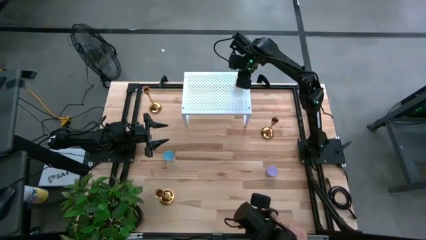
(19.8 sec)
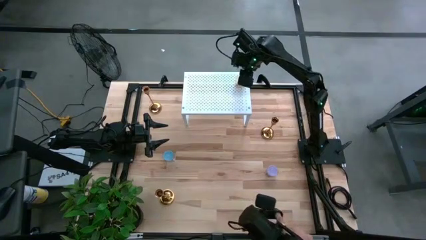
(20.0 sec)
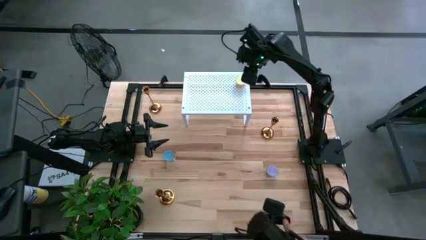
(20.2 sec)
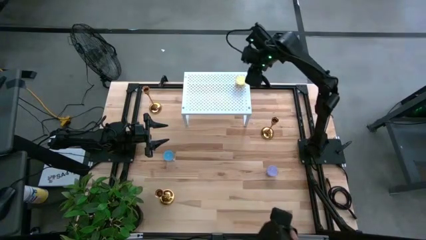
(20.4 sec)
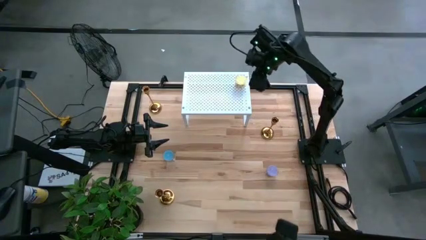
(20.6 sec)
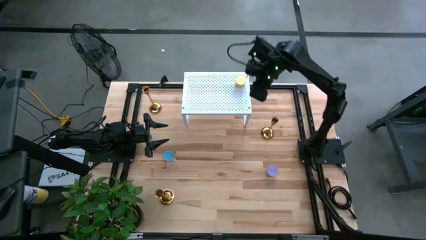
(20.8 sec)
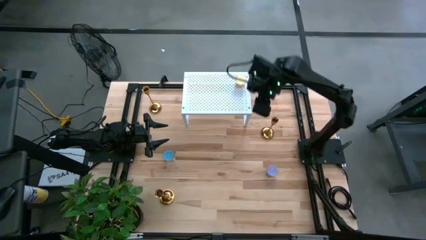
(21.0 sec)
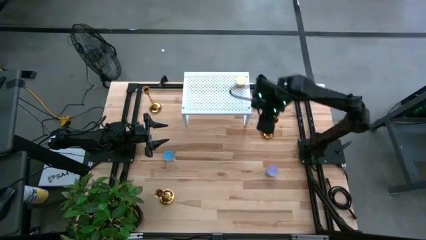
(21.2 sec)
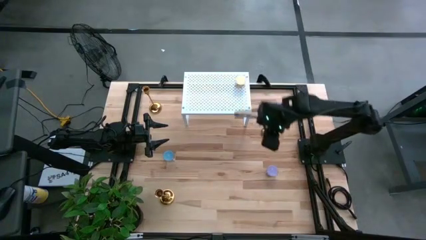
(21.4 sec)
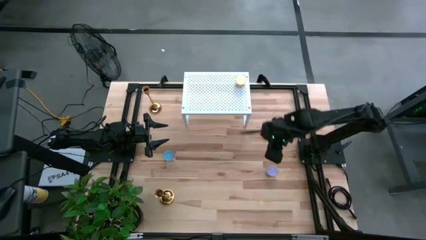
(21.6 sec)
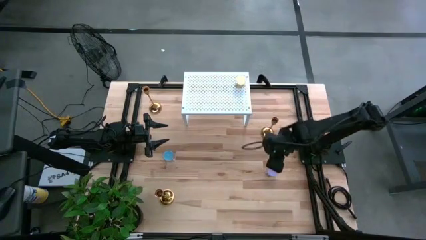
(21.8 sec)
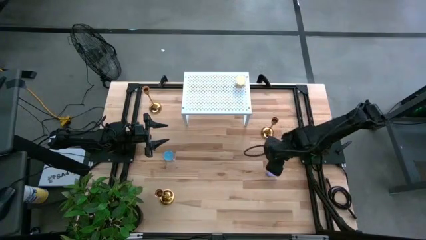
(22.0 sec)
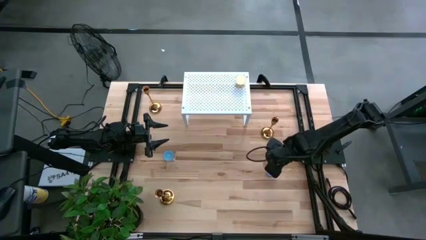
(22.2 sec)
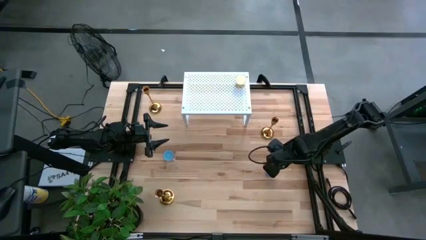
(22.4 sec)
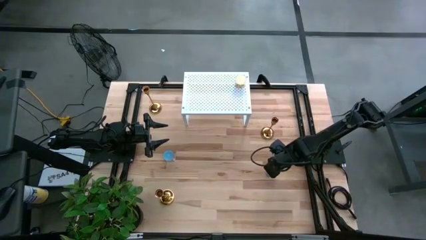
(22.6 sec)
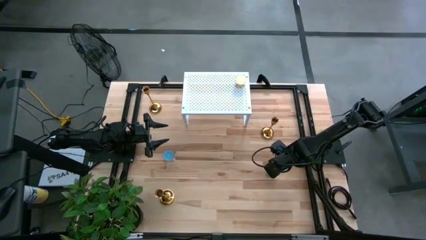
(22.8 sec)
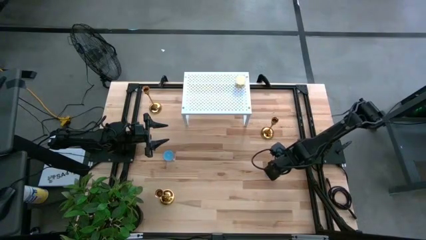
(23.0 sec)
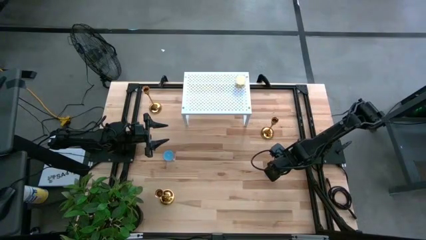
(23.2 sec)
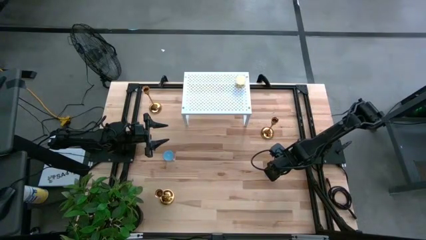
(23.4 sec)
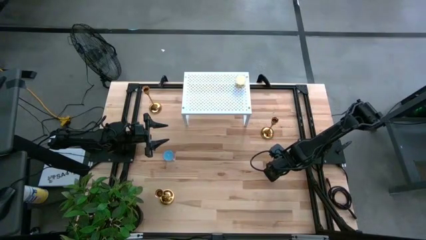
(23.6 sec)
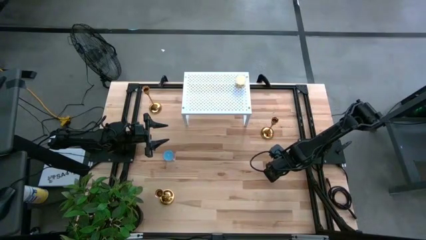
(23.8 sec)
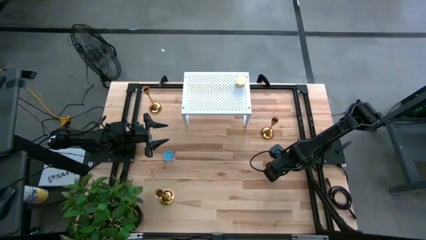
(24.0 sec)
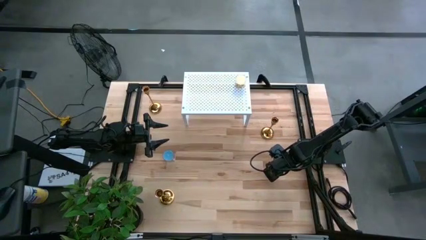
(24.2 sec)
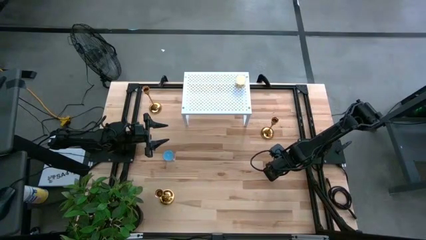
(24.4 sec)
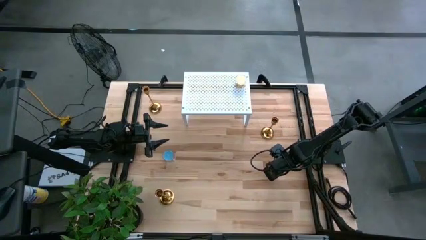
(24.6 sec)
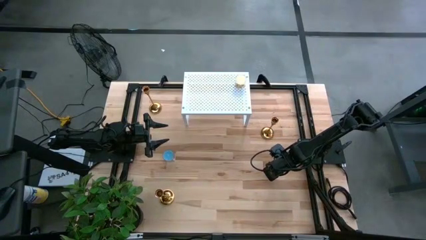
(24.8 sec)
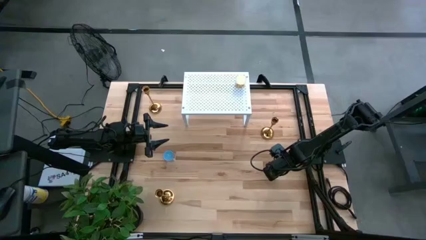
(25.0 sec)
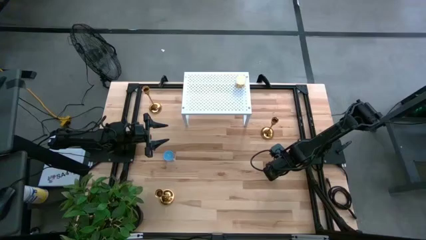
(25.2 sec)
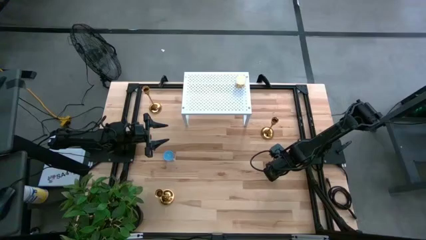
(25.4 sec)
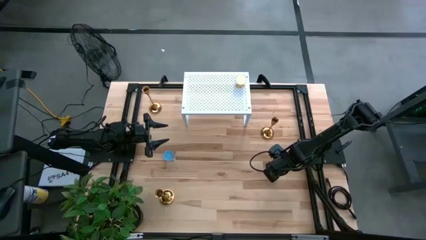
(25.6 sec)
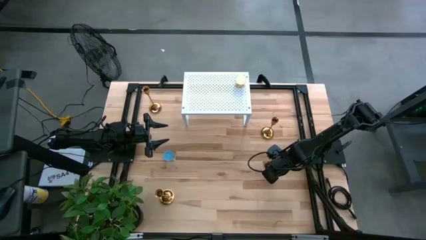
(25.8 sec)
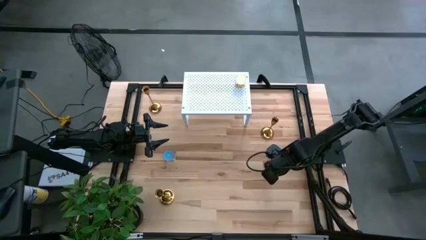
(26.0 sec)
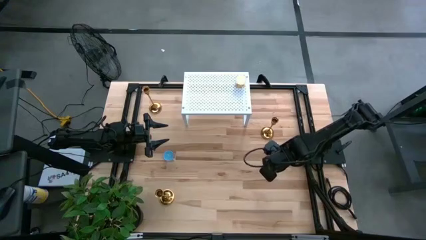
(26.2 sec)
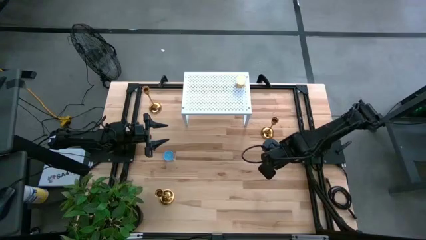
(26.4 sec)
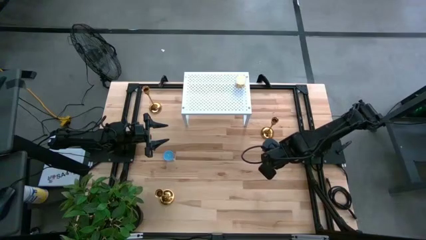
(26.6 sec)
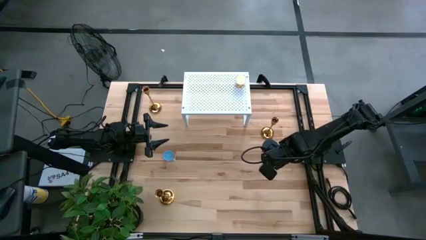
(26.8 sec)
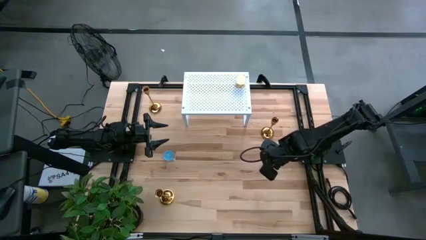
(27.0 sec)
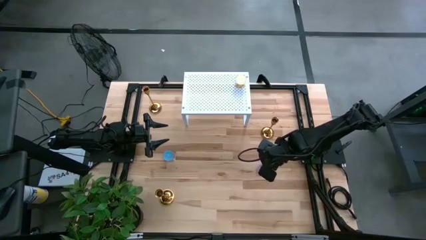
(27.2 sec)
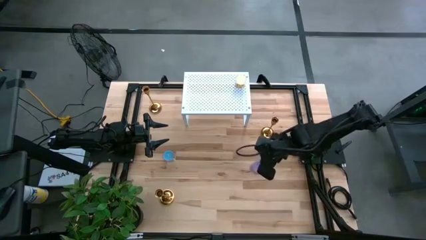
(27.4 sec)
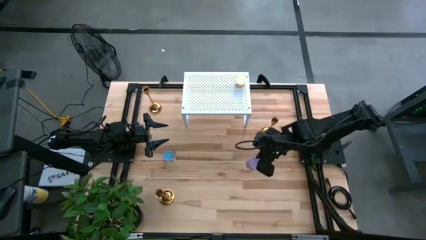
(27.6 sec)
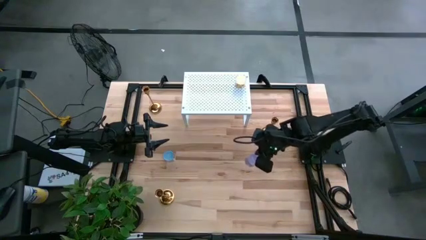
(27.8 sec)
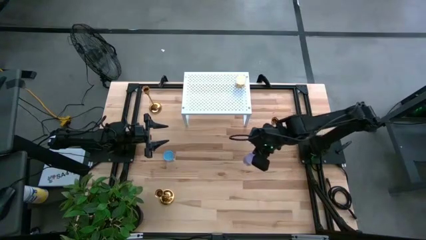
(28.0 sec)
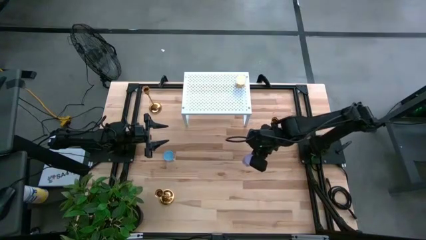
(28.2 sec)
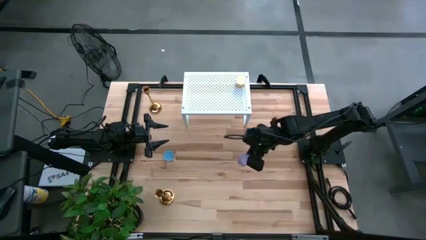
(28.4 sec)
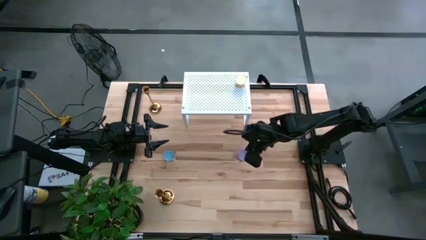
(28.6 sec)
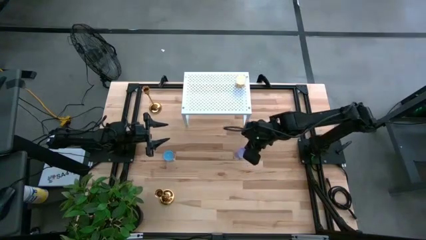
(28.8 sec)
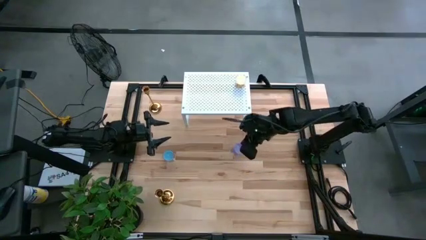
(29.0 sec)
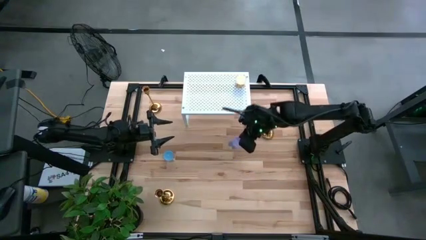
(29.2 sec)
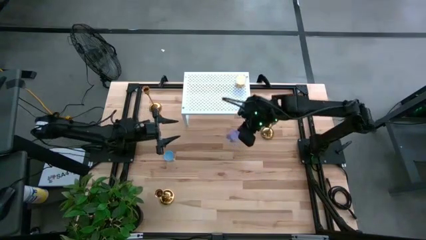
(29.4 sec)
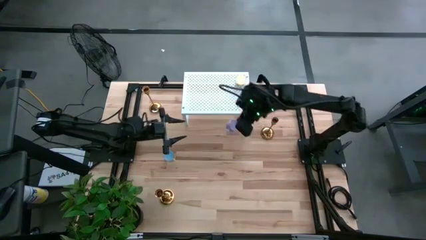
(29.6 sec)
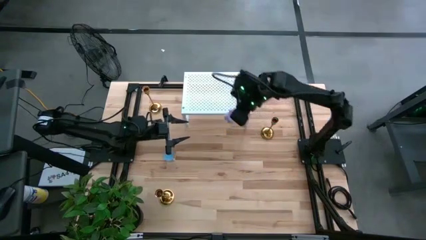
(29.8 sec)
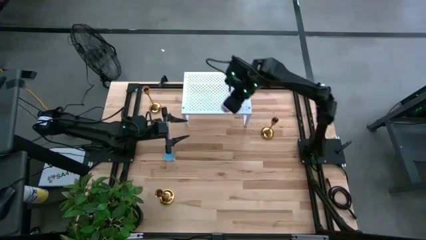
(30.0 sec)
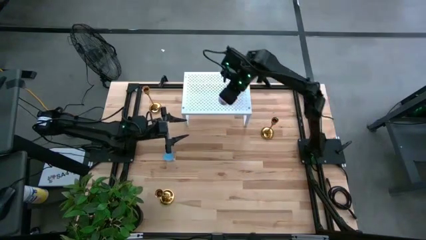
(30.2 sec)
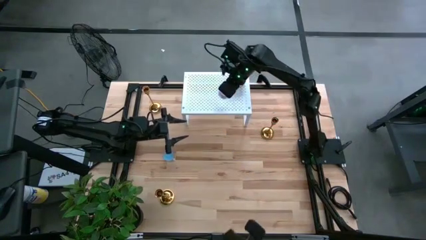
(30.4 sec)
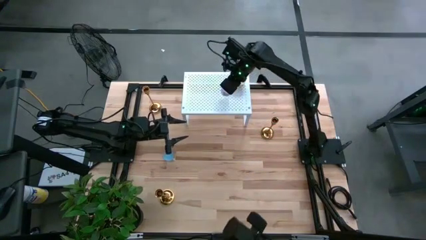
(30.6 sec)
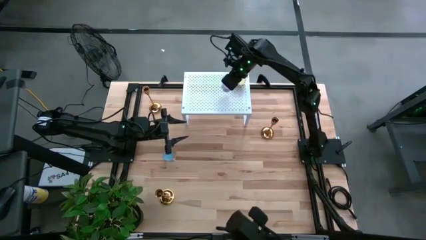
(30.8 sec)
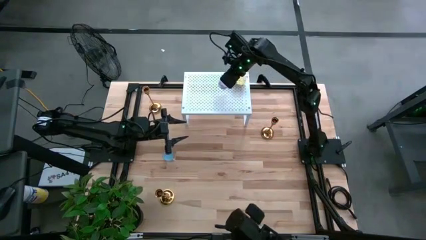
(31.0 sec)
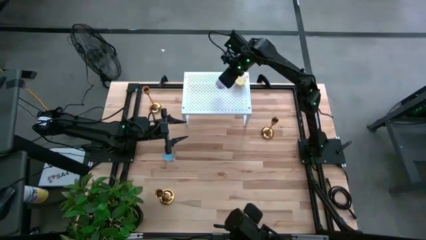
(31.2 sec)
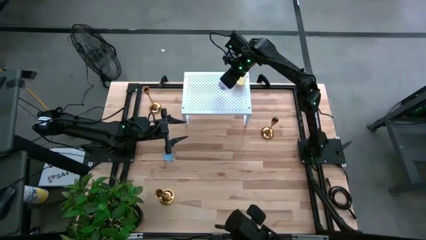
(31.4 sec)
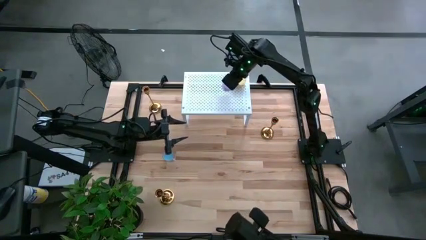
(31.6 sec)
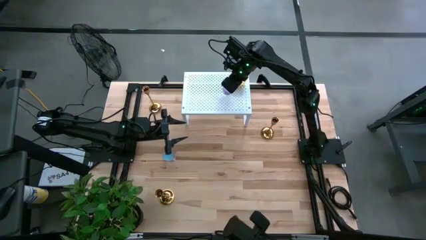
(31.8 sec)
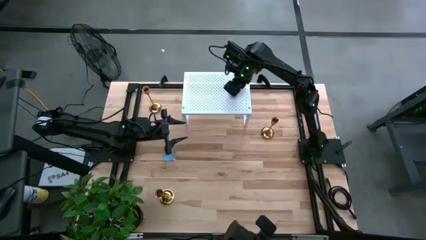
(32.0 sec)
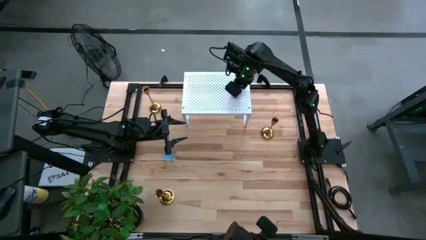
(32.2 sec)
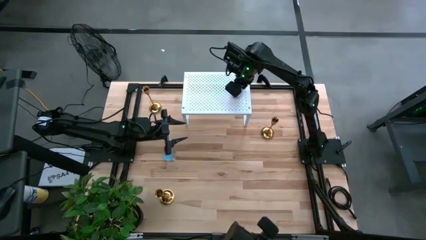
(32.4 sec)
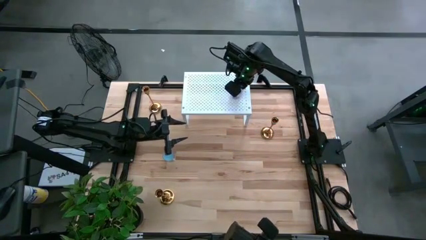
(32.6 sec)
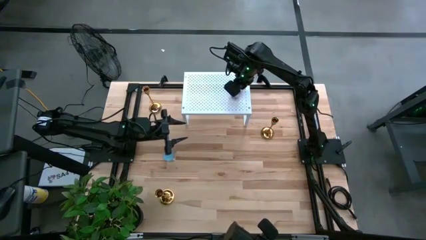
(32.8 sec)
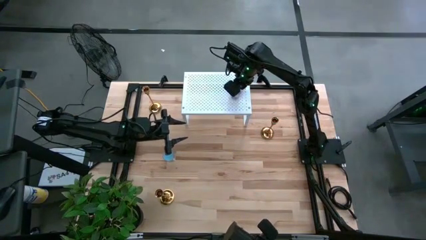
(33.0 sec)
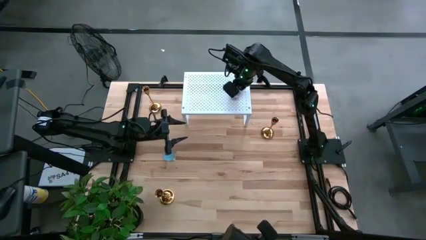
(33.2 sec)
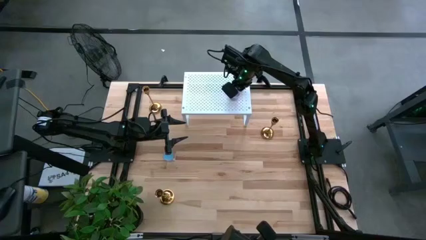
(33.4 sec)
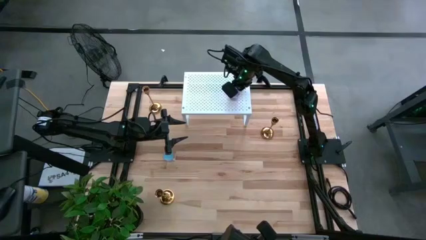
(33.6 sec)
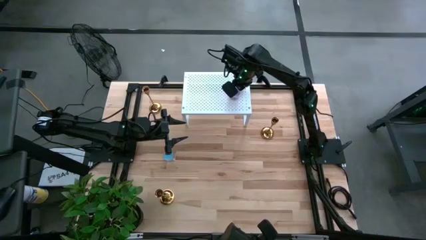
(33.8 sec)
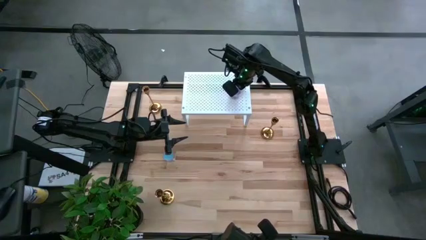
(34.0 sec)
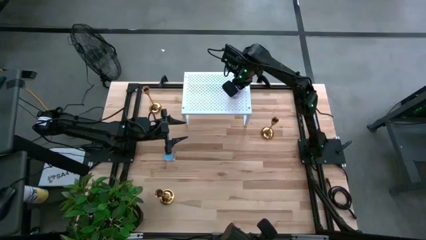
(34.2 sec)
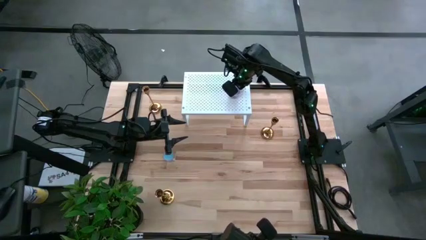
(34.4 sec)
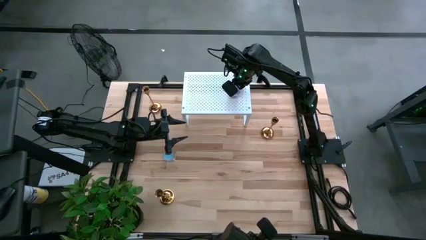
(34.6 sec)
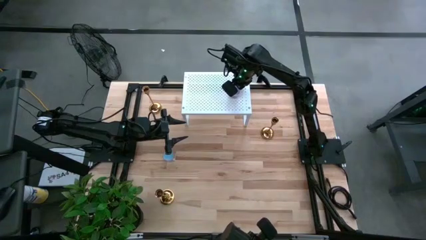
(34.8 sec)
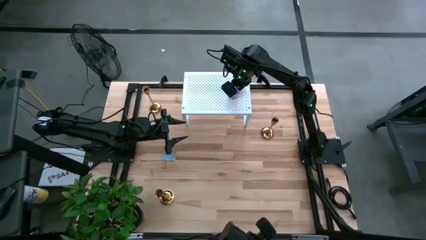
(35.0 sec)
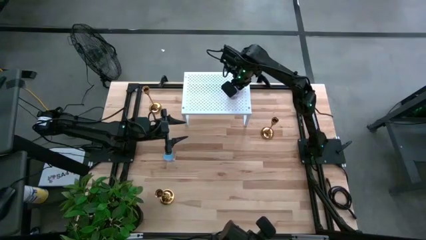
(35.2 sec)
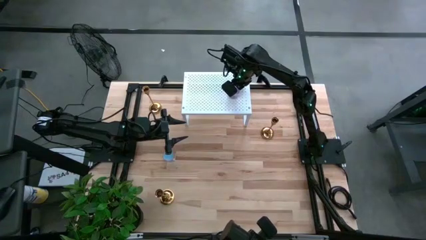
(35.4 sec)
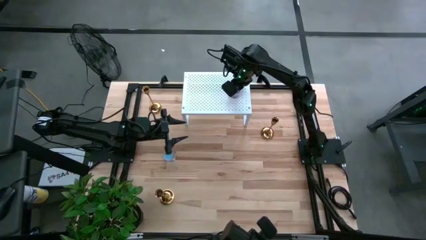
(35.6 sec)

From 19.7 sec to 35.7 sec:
Task: Pick & Place candle stick holders
Put the purple scented candle on the shelf
